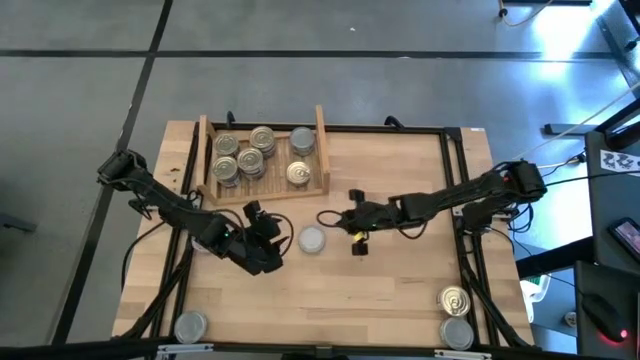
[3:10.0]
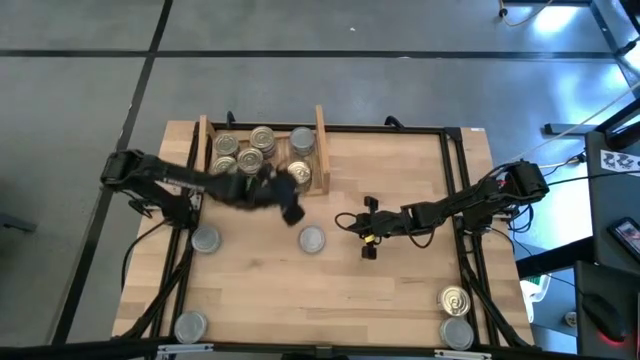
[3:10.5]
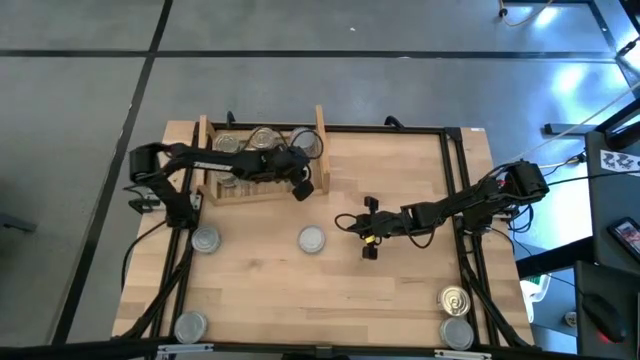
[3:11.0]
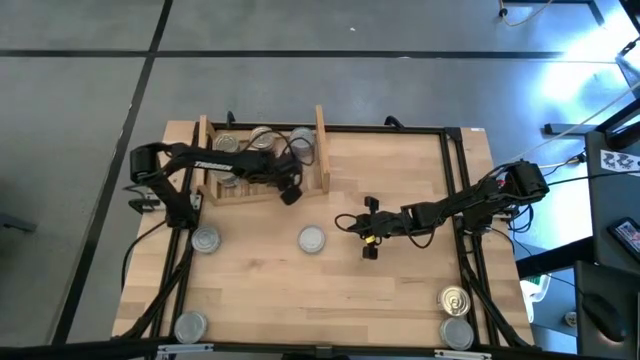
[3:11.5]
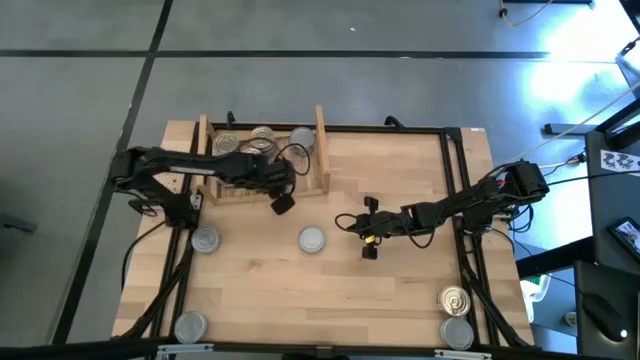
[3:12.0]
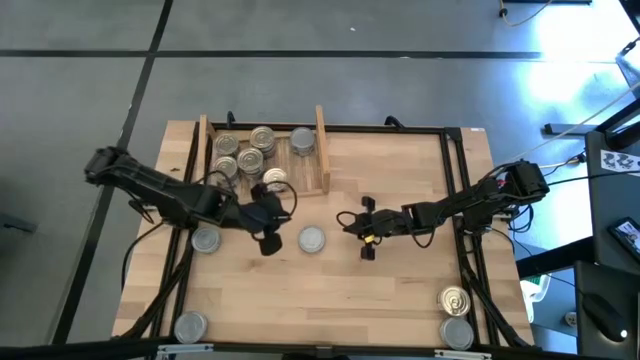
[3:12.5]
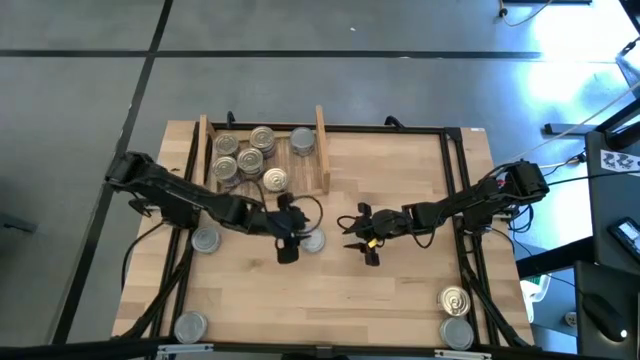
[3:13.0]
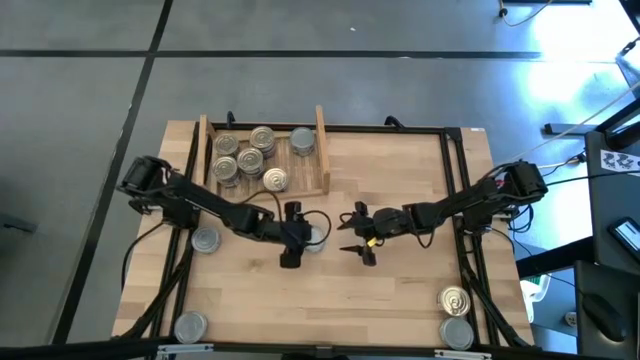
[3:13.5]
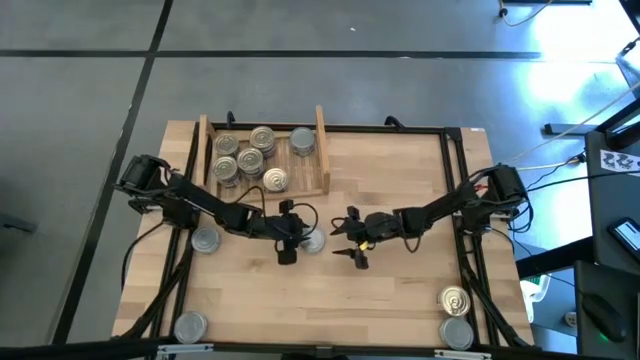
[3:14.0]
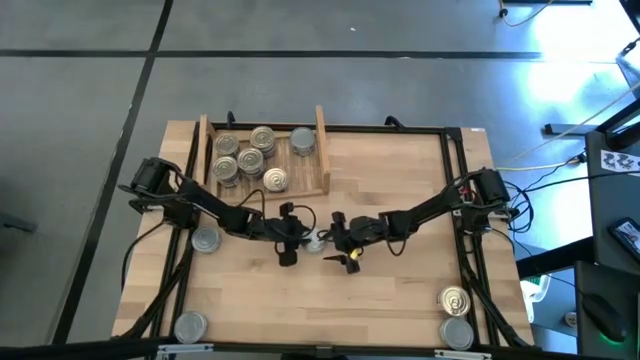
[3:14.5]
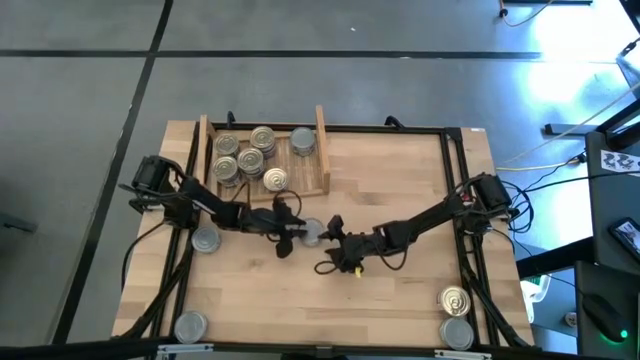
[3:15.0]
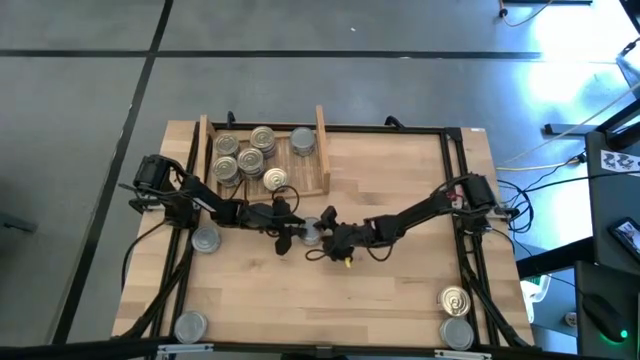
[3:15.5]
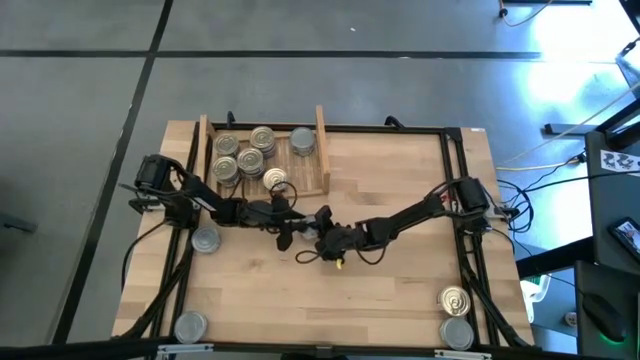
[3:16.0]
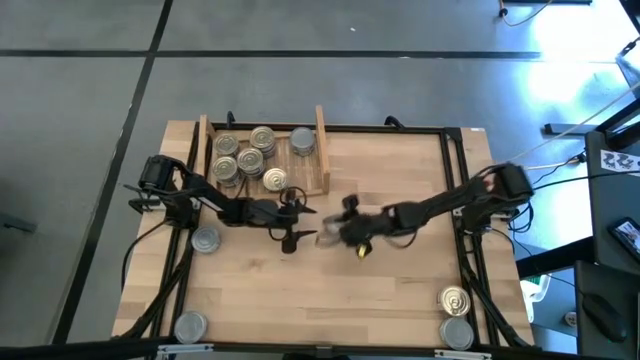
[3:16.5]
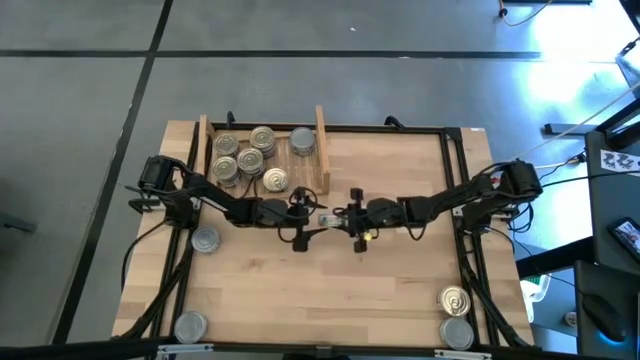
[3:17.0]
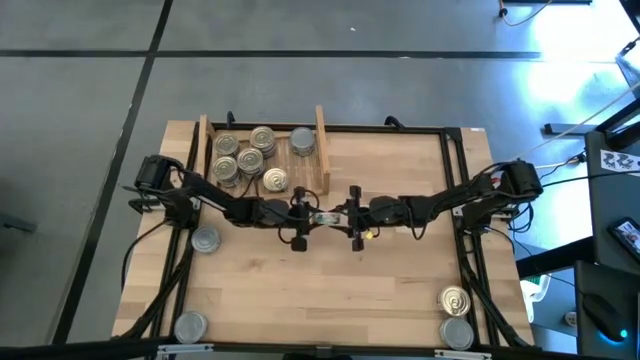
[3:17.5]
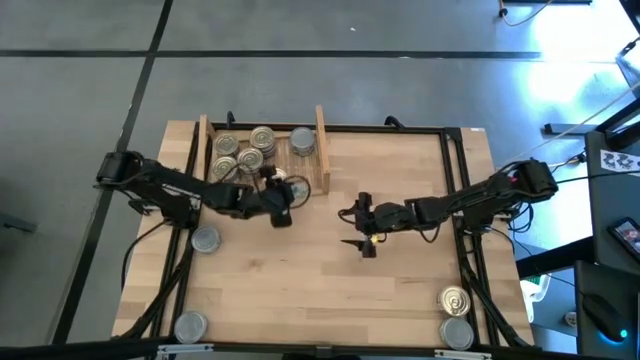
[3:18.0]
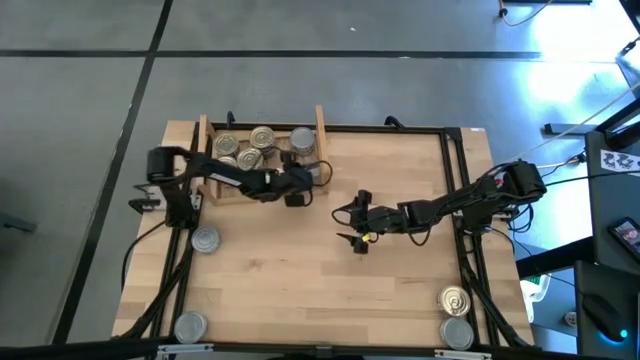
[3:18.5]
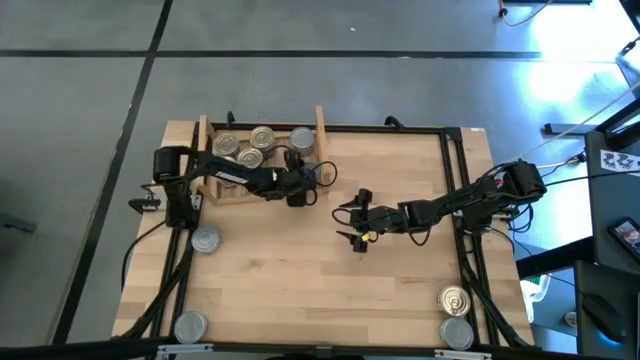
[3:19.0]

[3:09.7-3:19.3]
Task: Stack canned seafood by type on shelf
Put the green tuna can on the shelf

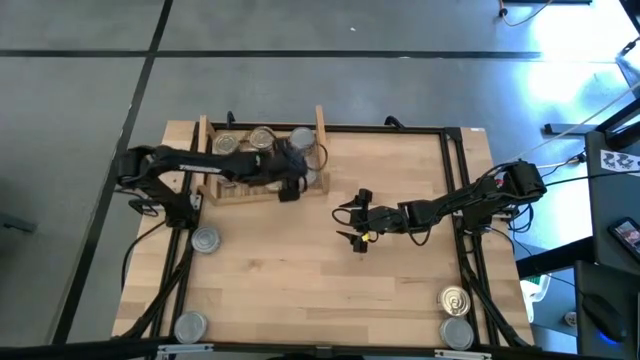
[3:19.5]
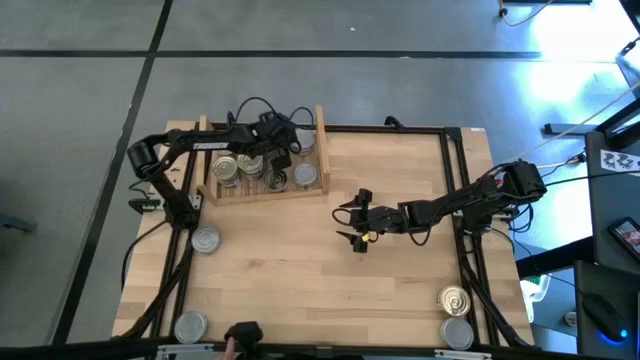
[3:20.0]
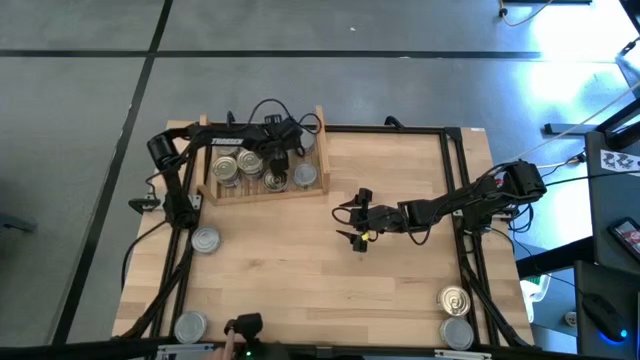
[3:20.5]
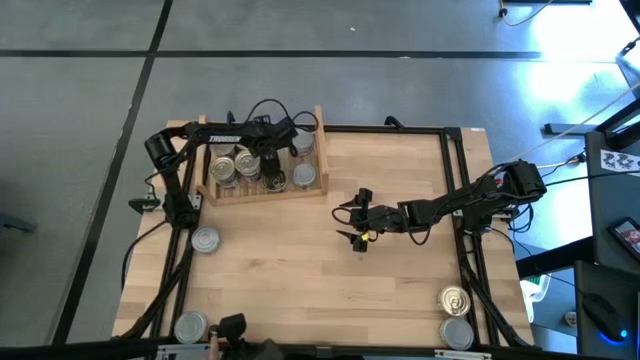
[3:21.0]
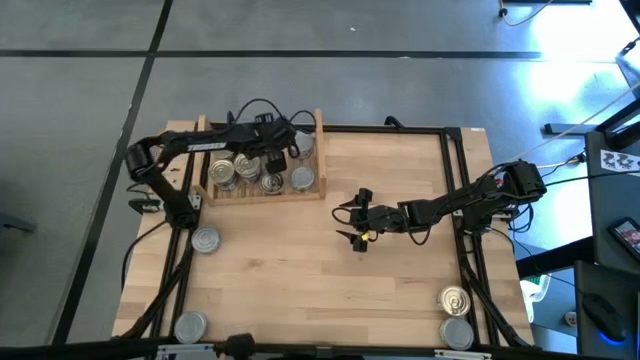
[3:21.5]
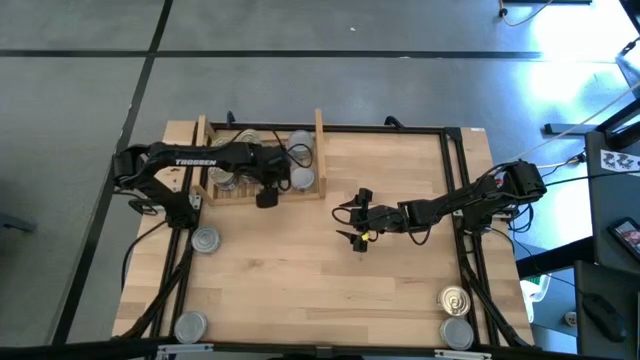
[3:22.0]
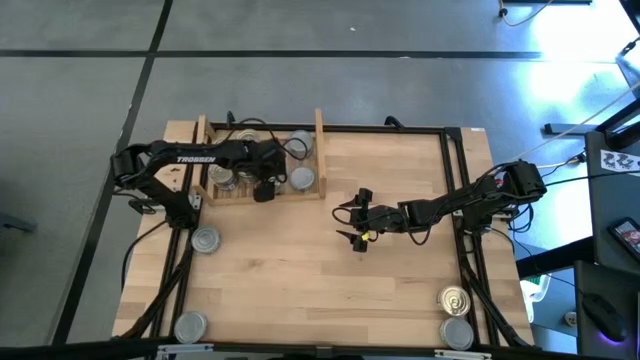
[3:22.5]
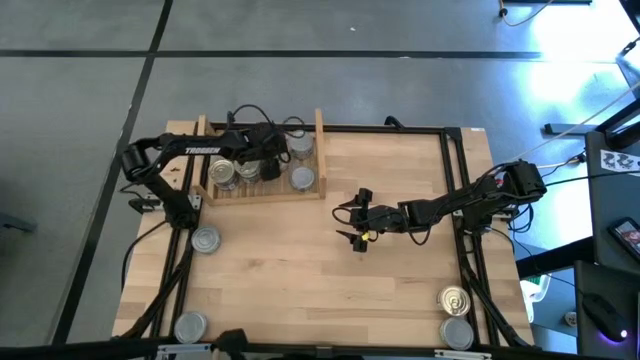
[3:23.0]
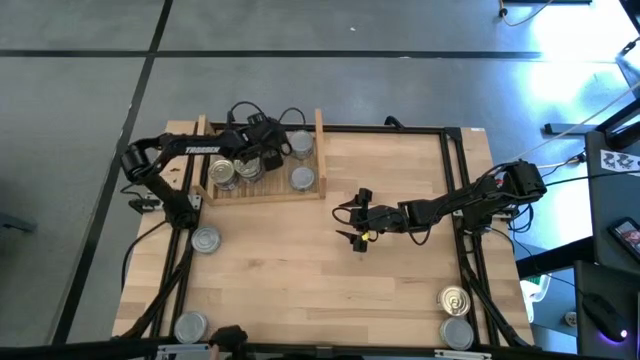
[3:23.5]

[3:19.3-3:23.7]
Adjust the blue tuna cans

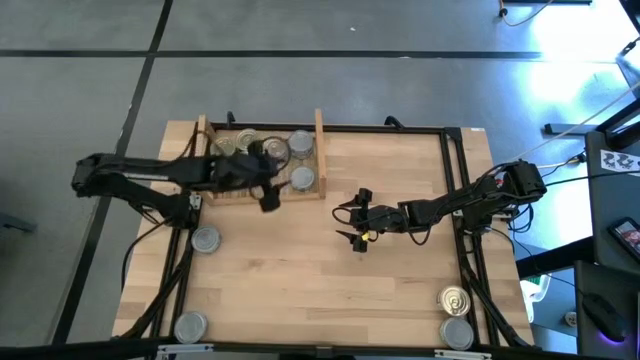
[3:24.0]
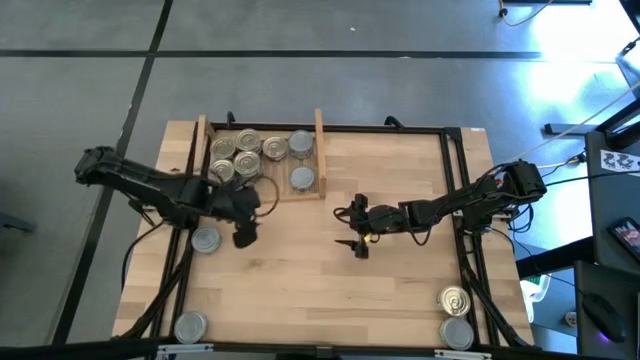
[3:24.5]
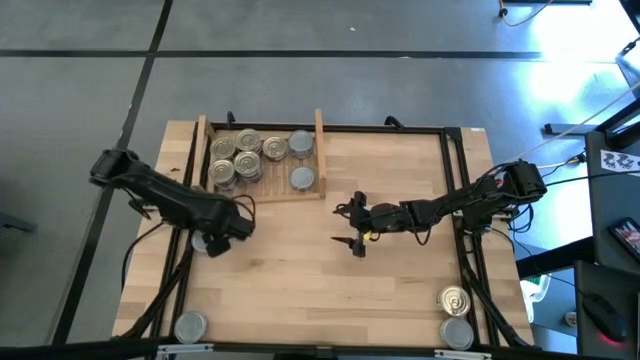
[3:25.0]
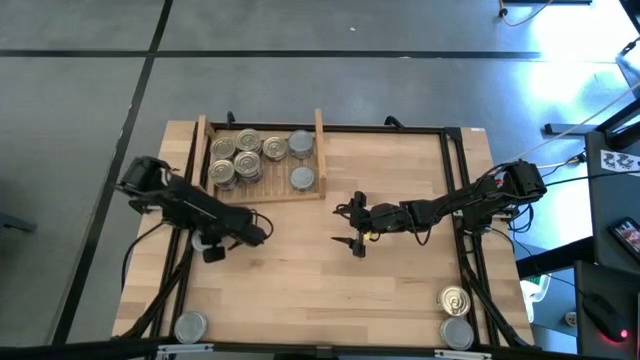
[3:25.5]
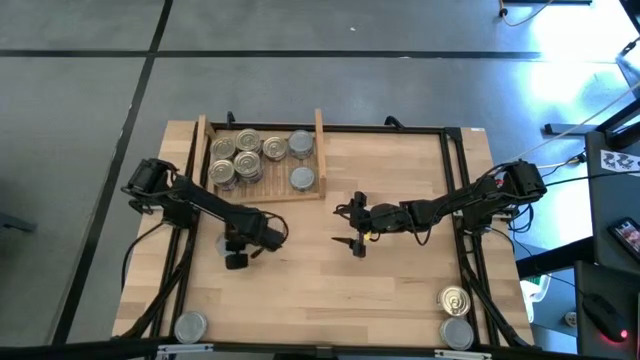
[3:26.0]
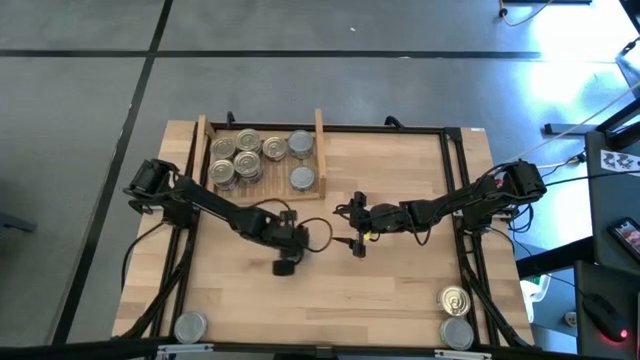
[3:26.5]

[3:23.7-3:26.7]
Move the green tuna can from the middle left to the center

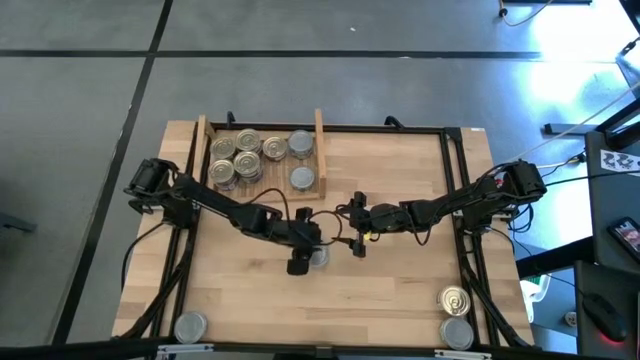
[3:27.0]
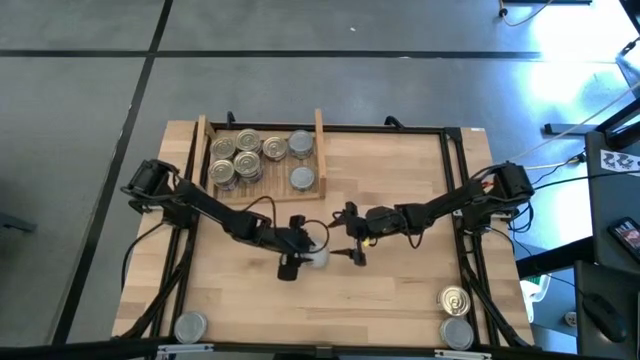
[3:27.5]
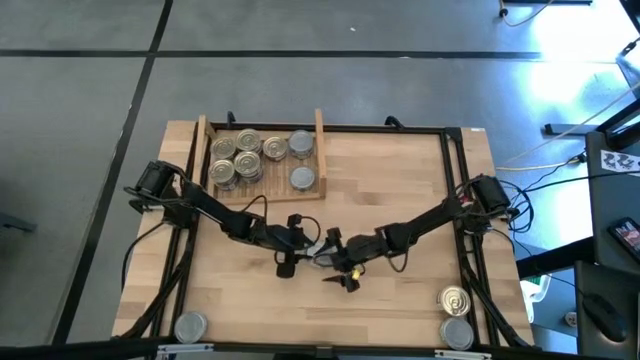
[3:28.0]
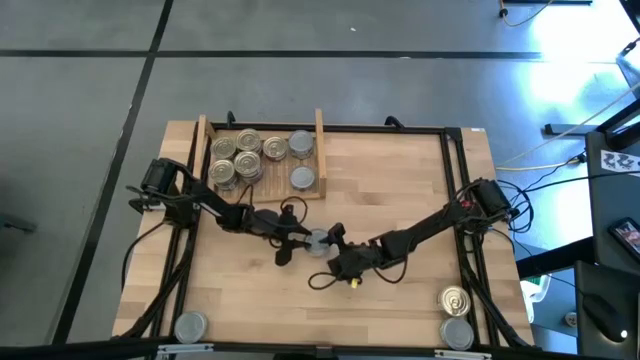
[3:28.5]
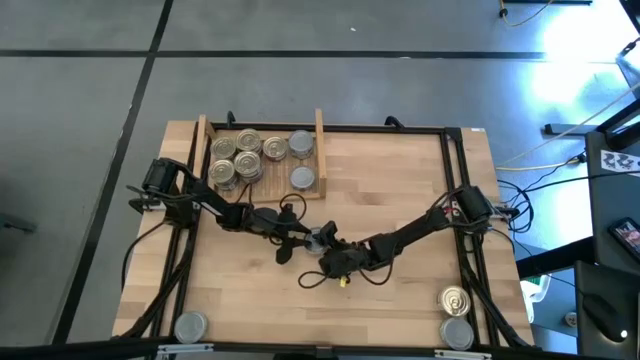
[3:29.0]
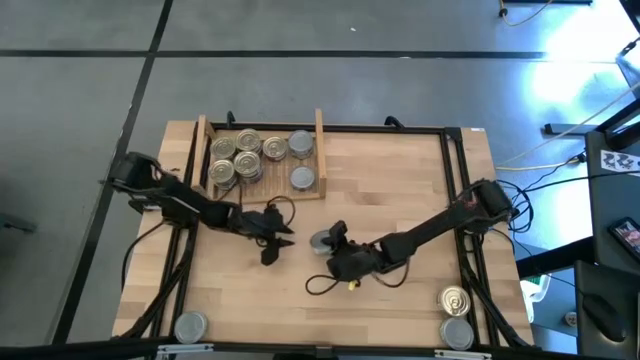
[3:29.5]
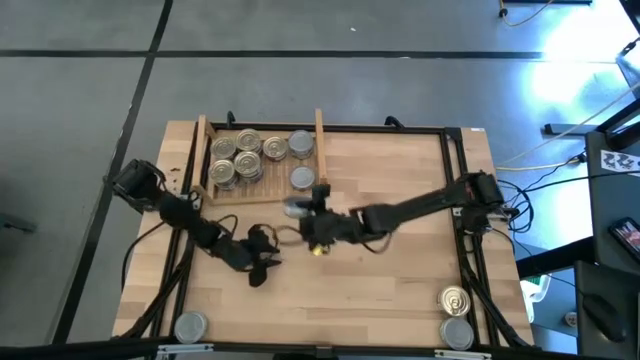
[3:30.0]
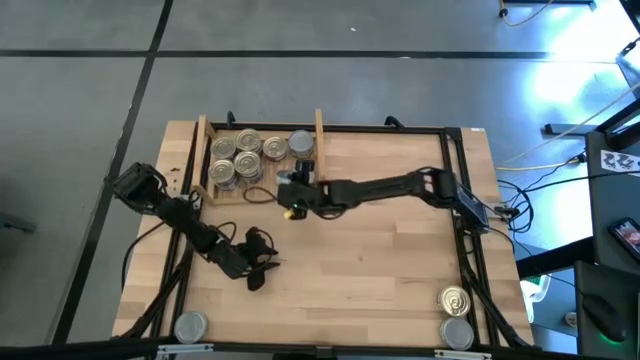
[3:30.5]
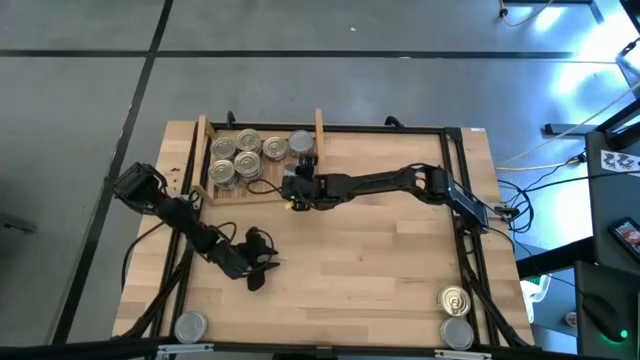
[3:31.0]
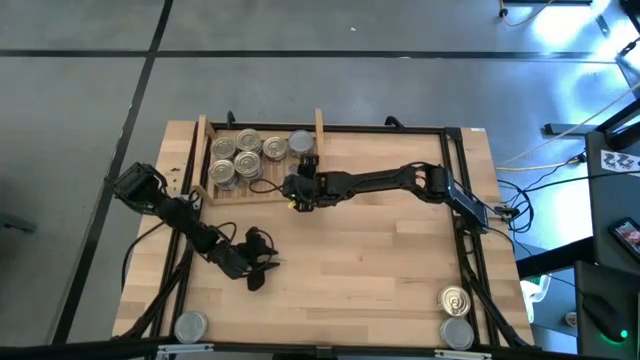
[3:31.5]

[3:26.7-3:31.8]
Stack the green tuna can on top of the other green tuna can on the shelf
